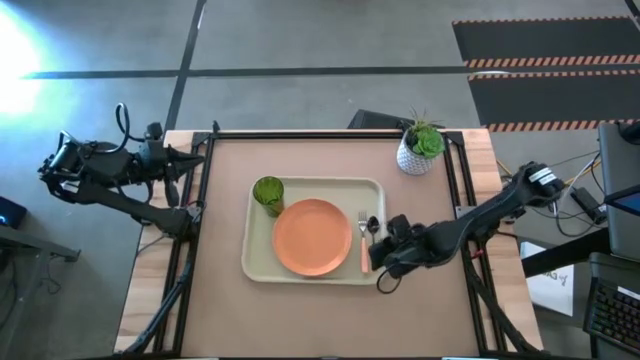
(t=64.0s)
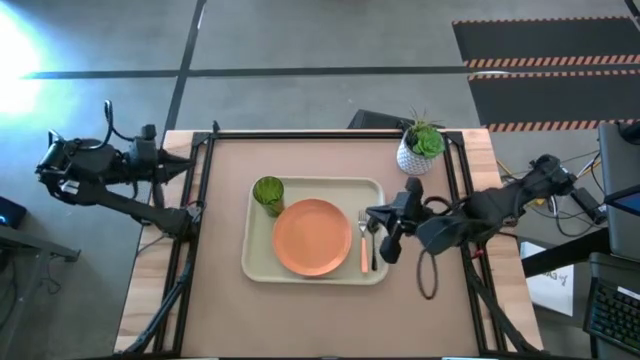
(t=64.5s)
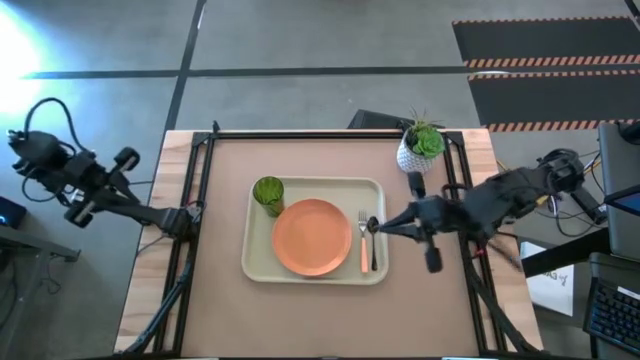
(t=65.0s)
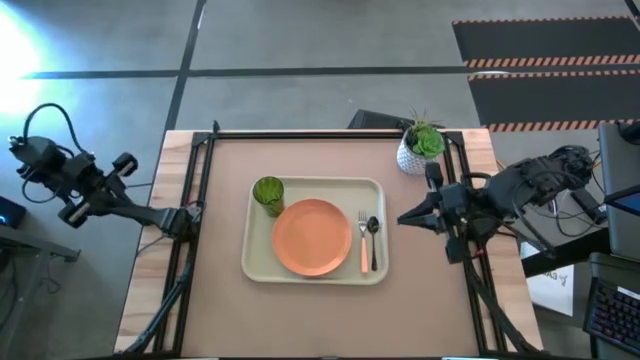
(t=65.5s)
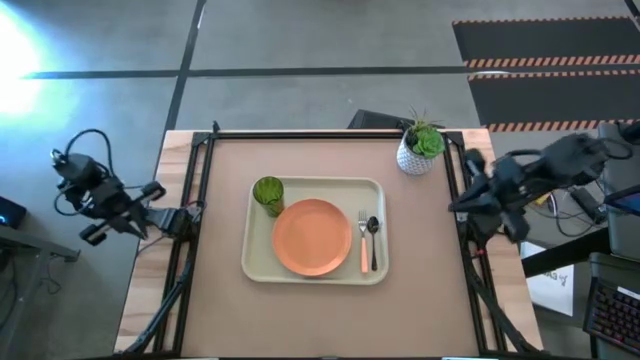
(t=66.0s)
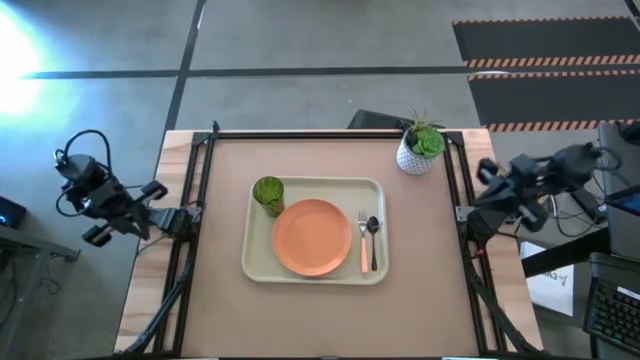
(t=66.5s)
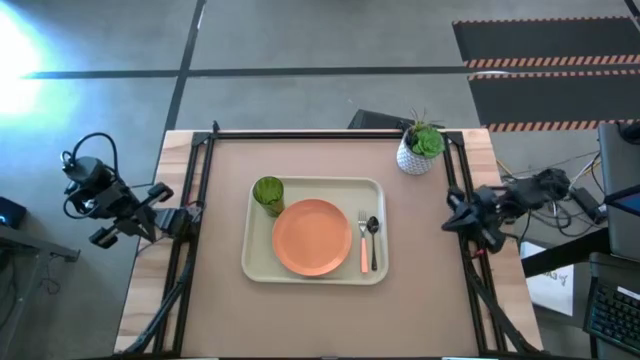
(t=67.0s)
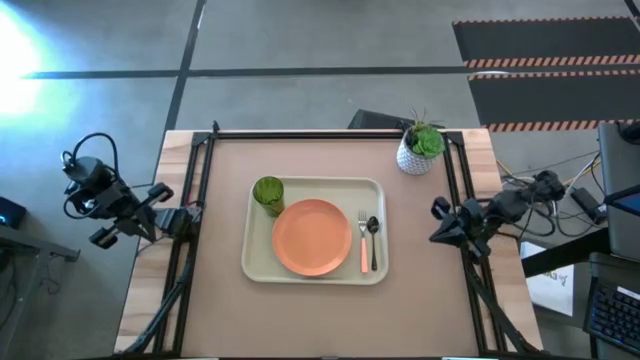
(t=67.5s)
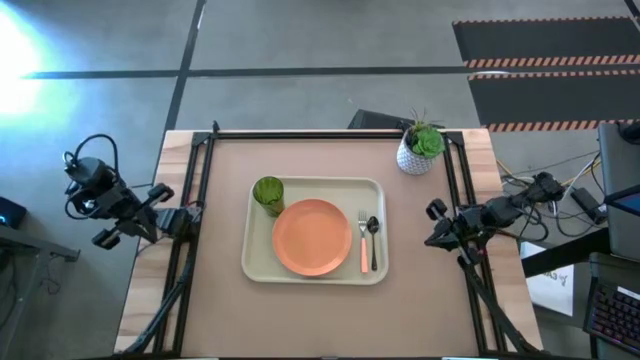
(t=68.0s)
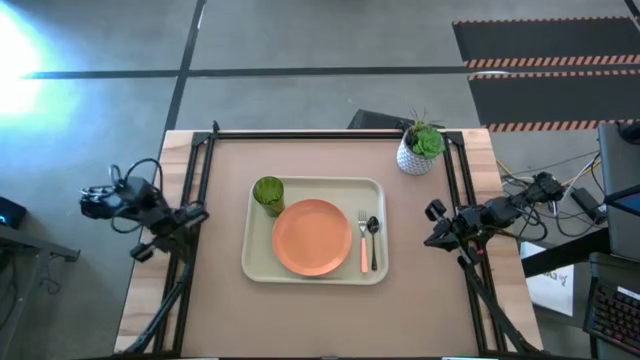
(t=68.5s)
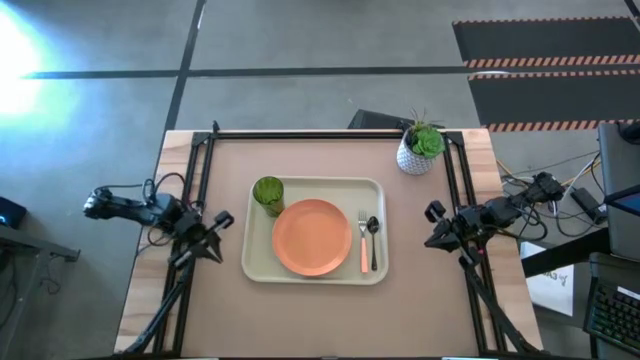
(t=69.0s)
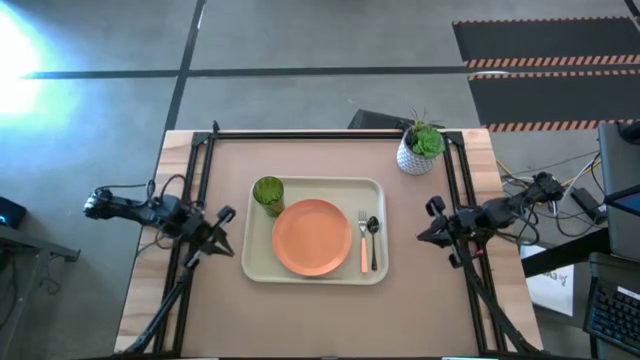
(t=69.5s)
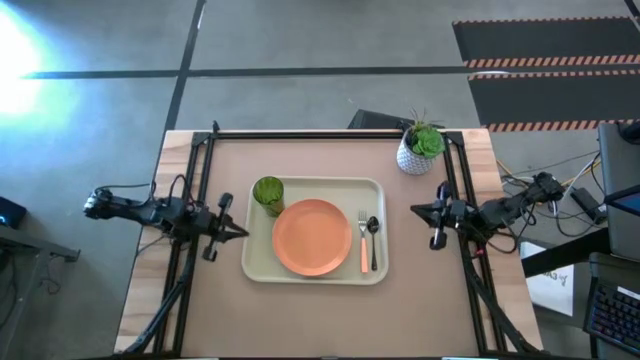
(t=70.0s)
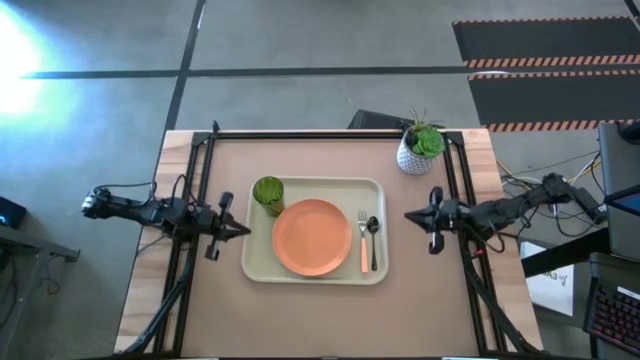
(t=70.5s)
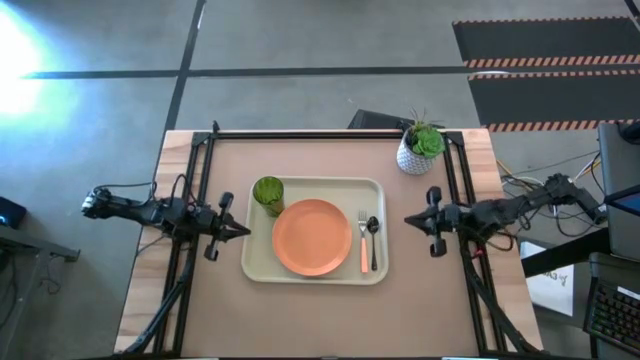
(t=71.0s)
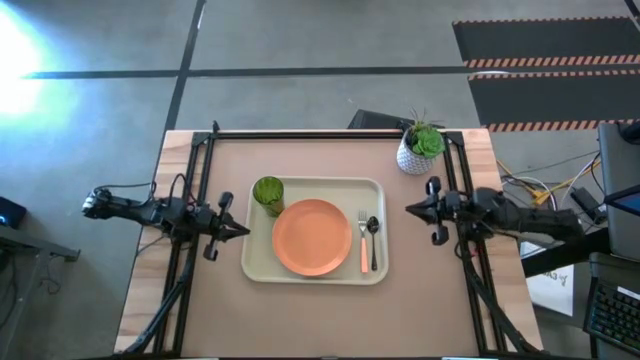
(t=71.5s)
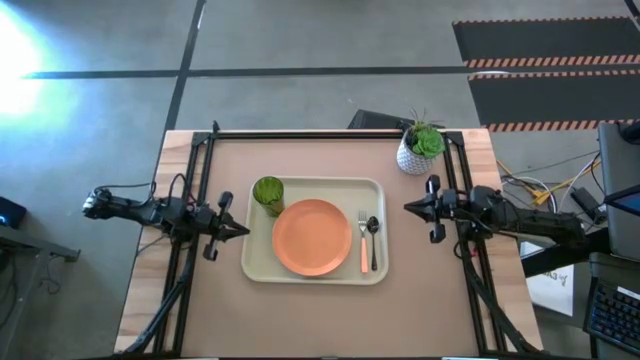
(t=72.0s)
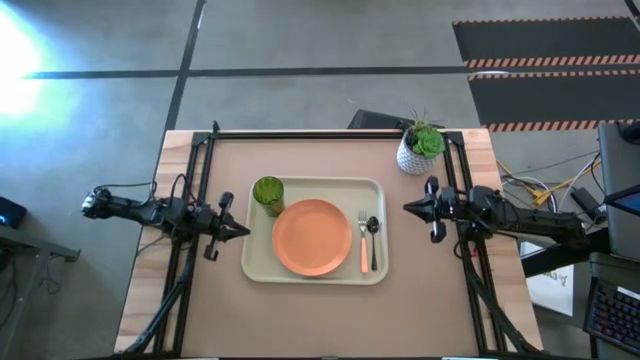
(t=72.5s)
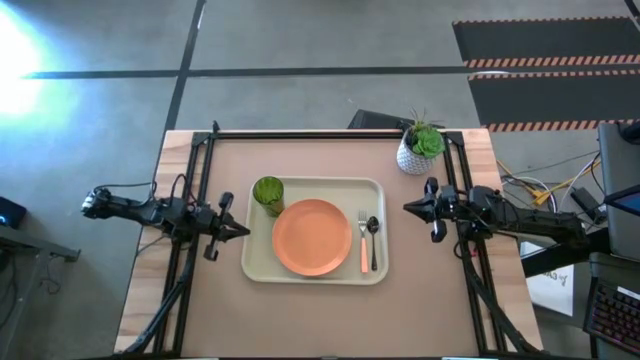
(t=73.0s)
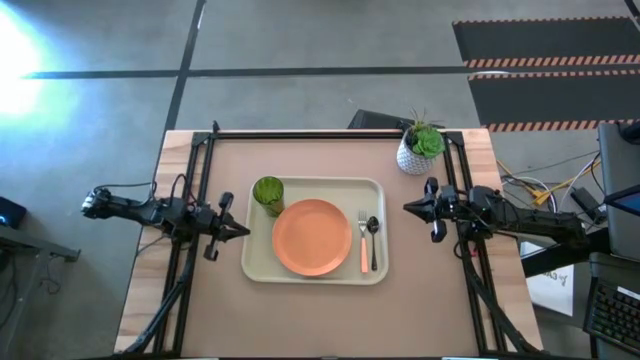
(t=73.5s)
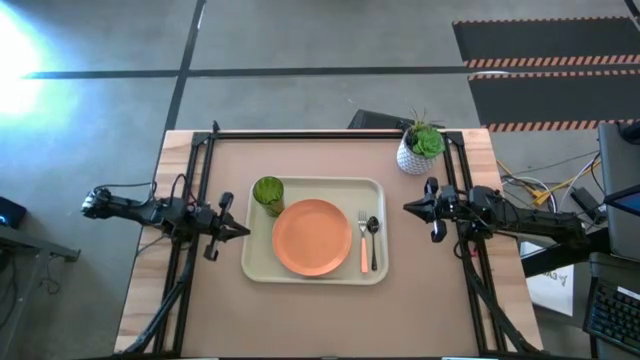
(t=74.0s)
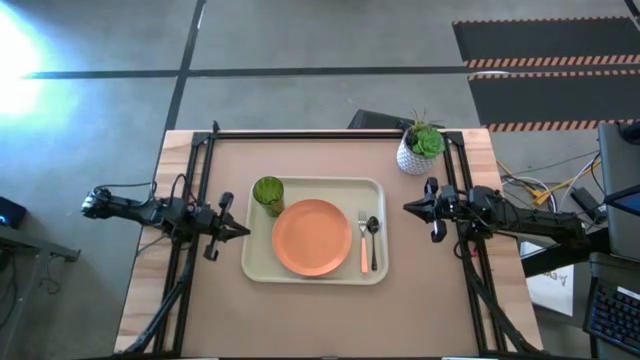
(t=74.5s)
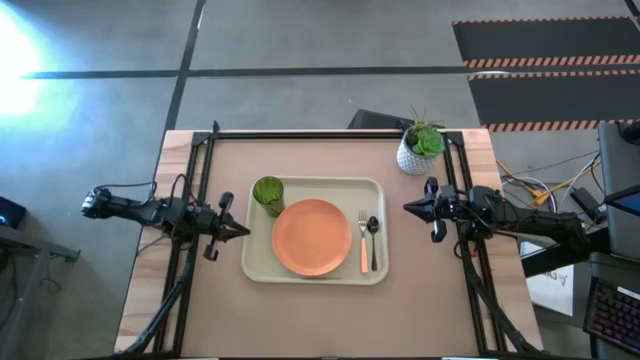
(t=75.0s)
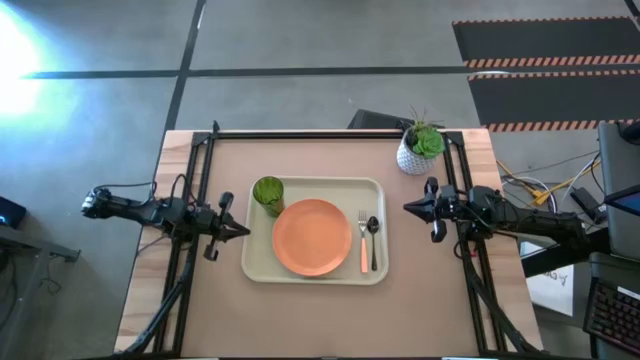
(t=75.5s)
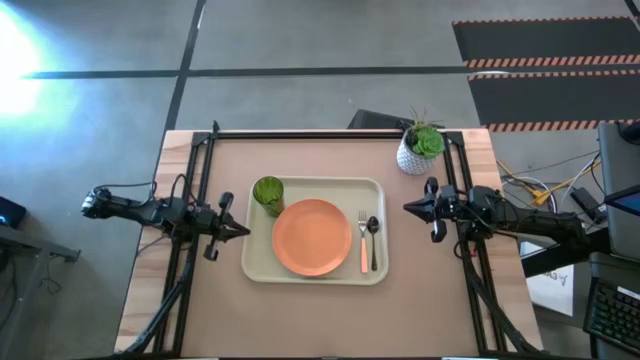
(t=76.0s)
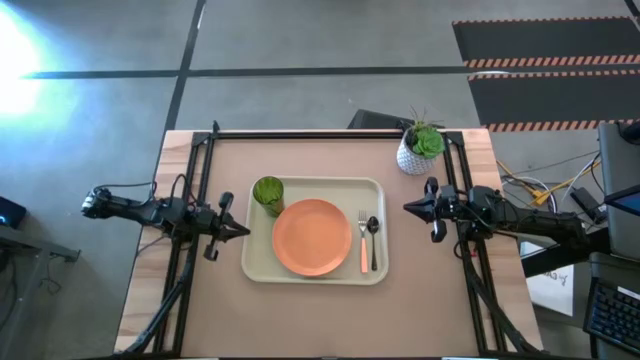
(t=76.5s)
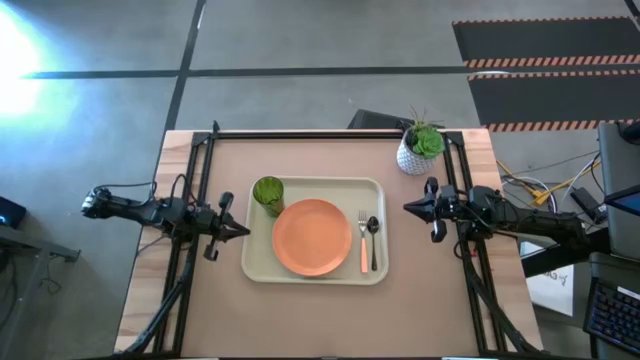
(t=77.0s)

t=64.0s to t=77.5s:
Task: Pick and place plate/cup/fork/spoon on tray
Return to Home Position

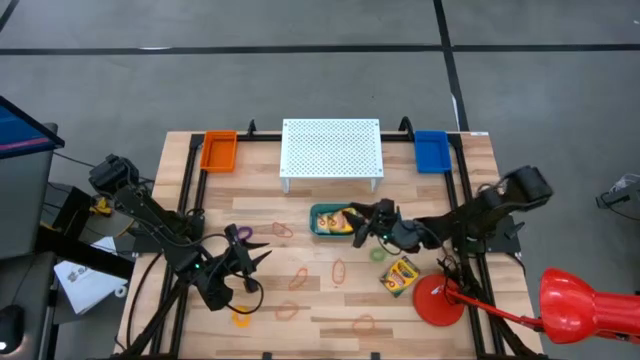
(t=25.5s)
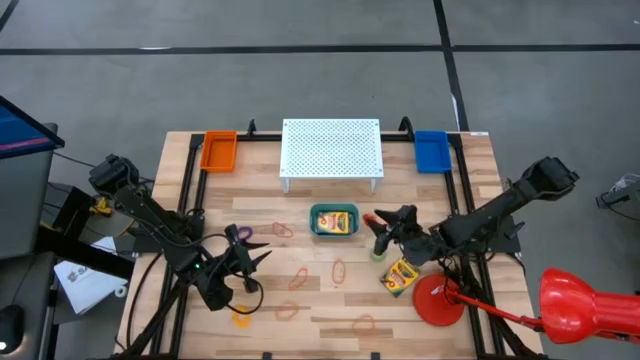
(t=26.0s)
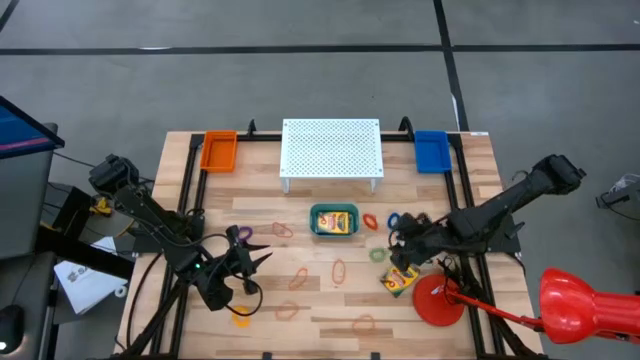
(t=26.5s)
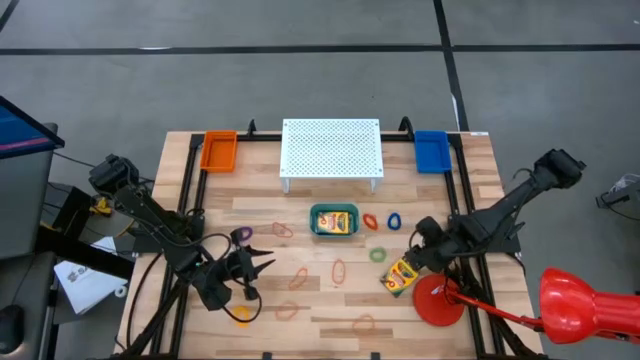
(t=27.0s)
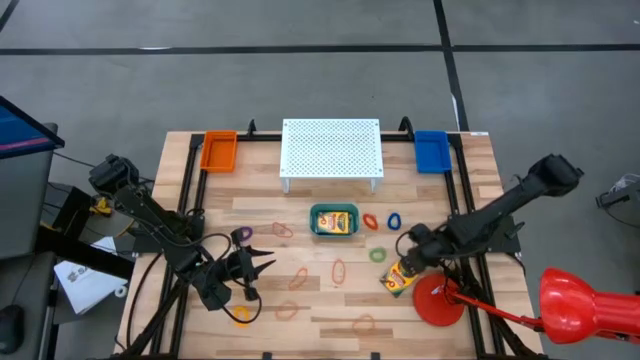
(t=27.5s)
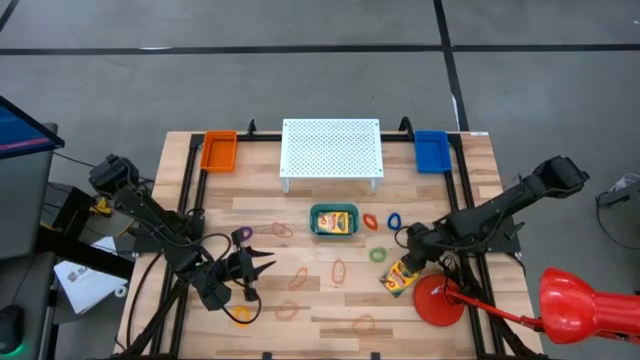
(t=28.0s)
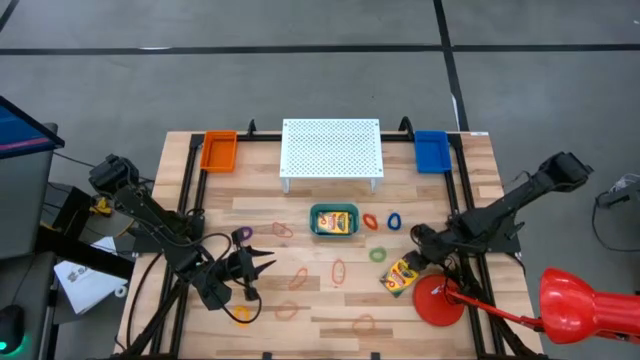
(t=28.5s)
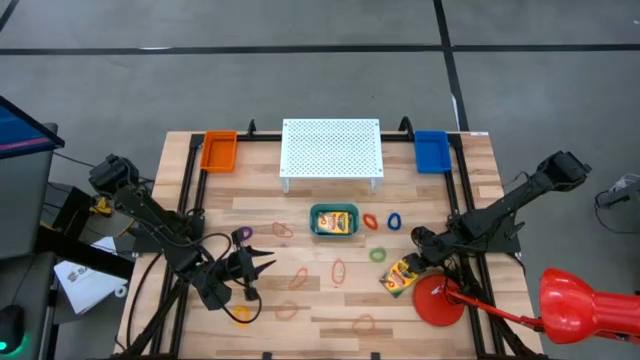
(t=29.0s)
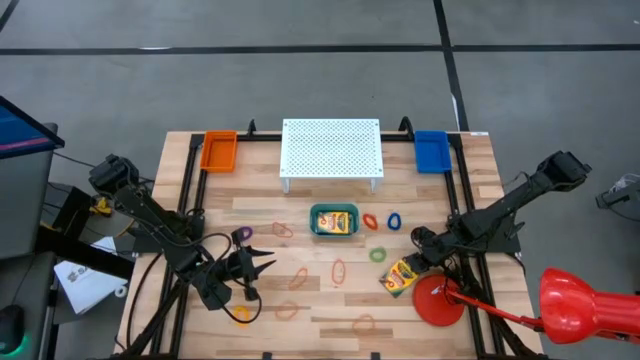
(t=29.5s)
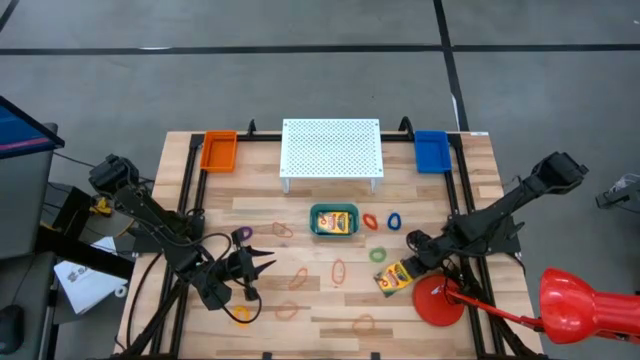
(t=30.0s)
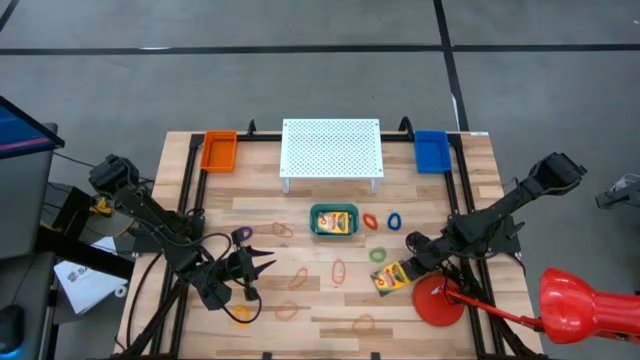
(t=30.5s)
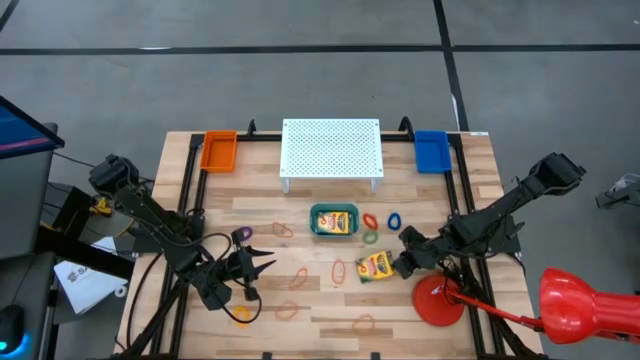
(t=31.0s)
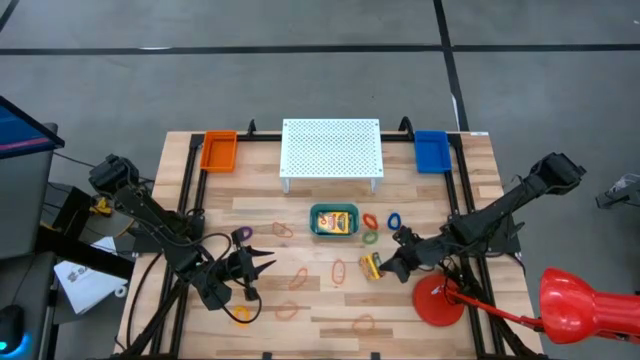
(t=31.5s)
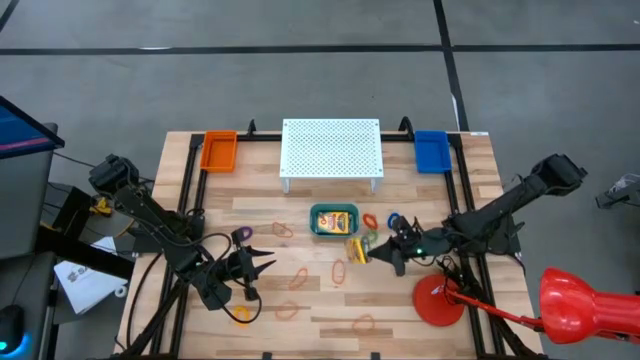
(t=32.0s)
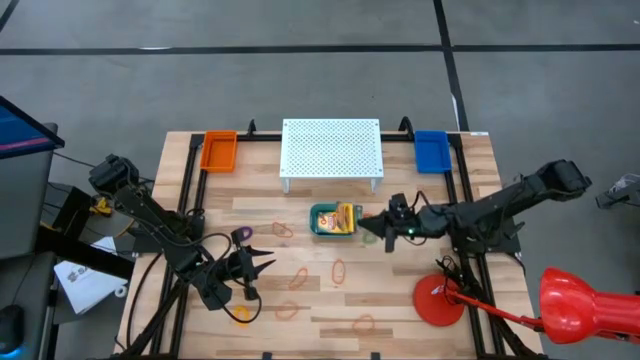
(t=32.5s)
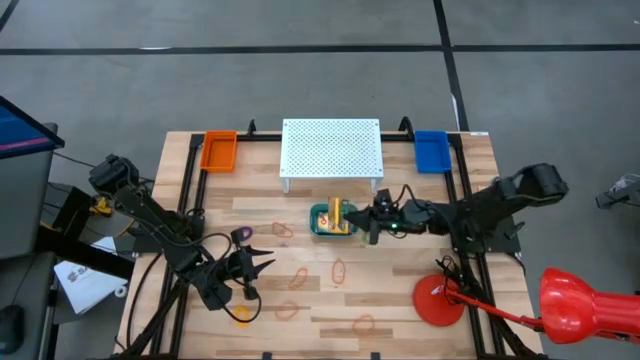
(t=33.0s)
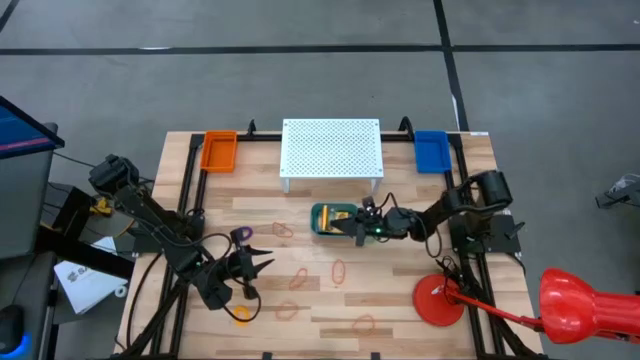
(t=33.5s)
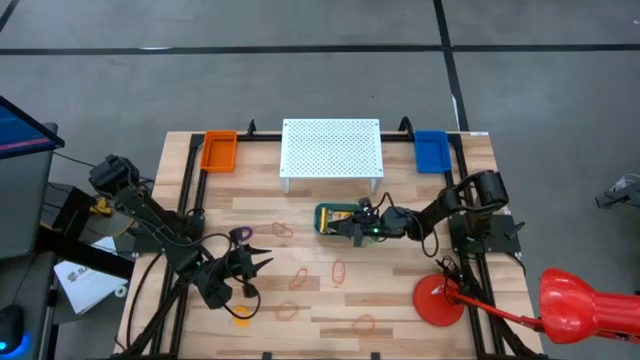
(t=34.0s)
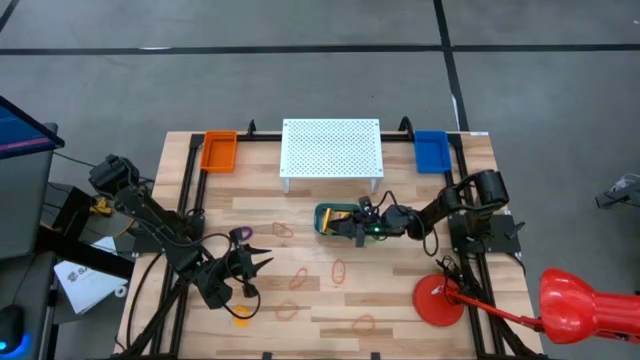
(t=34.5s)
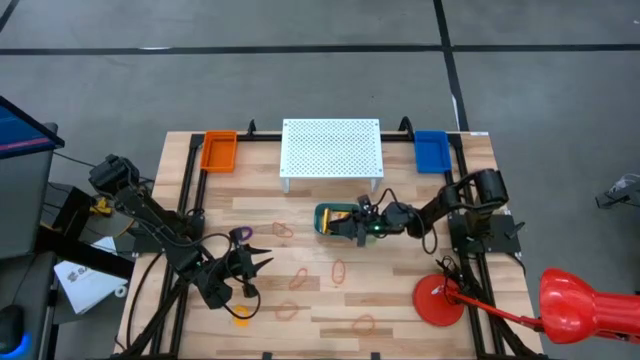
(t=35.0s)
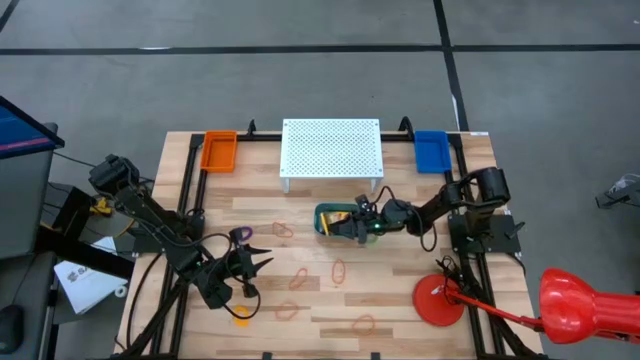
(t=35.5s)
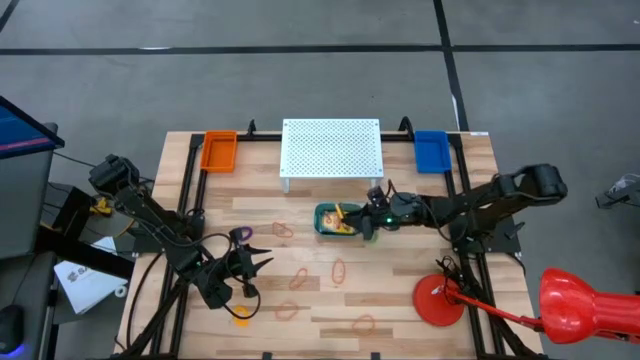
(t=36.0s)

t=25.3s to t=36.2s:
Task: Pick & Place Office Desk Supplies
Put the yellow crayon box into the green bin
